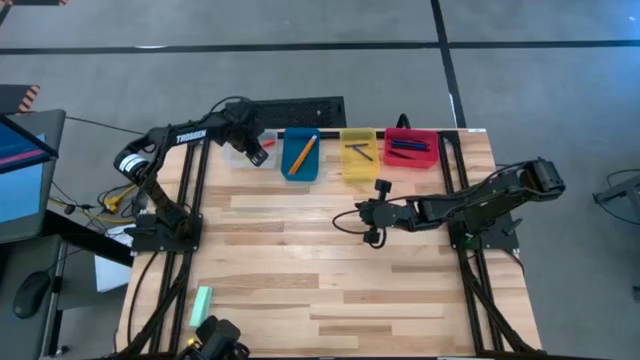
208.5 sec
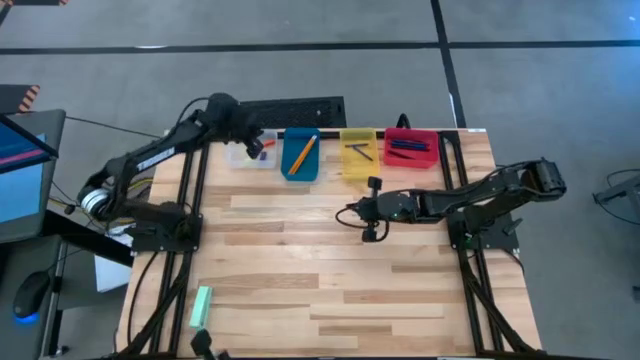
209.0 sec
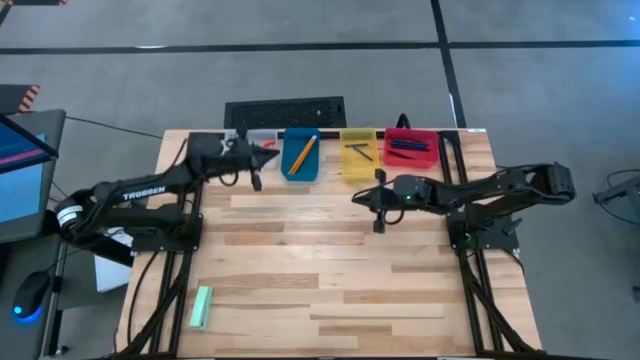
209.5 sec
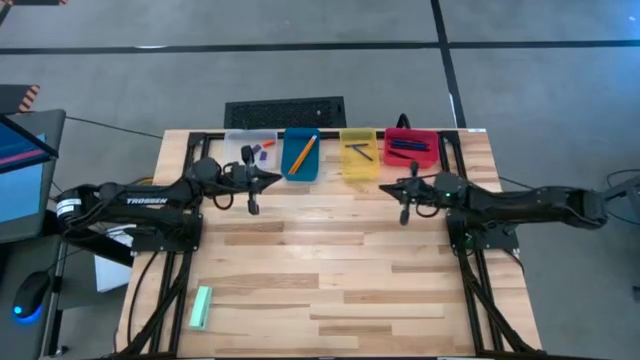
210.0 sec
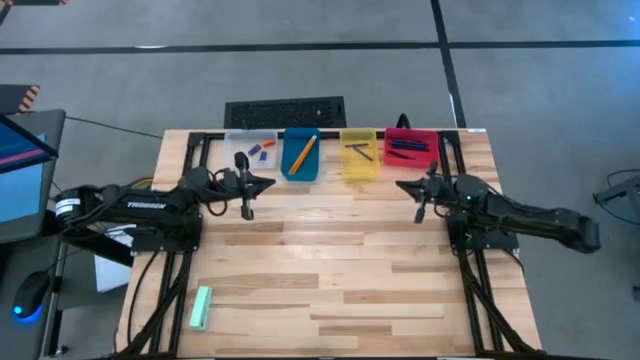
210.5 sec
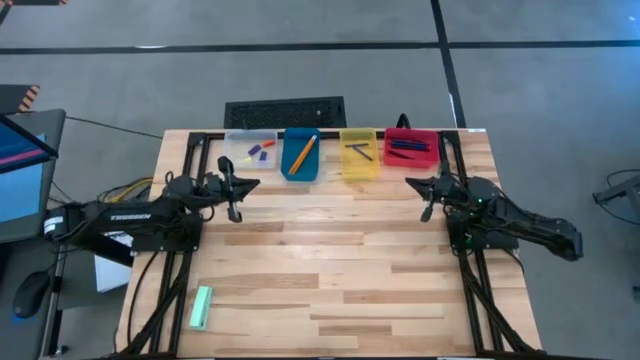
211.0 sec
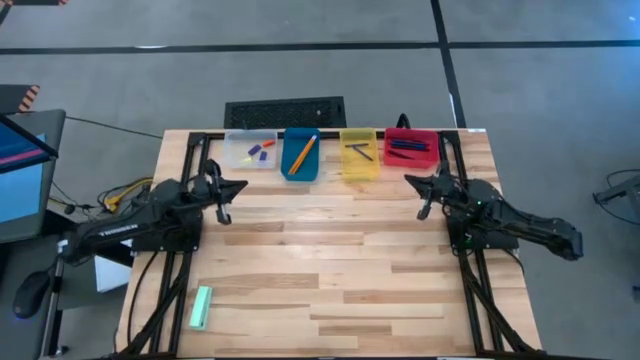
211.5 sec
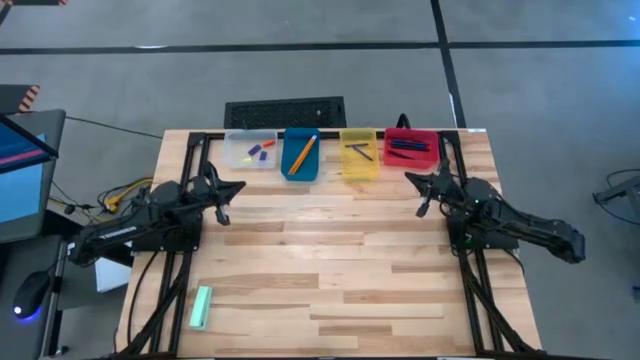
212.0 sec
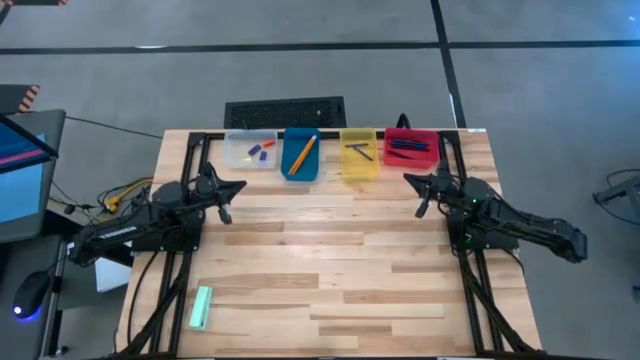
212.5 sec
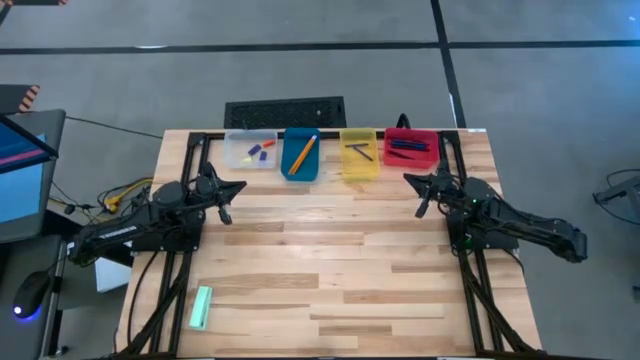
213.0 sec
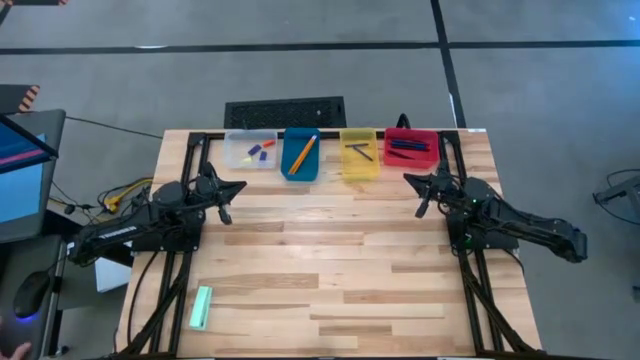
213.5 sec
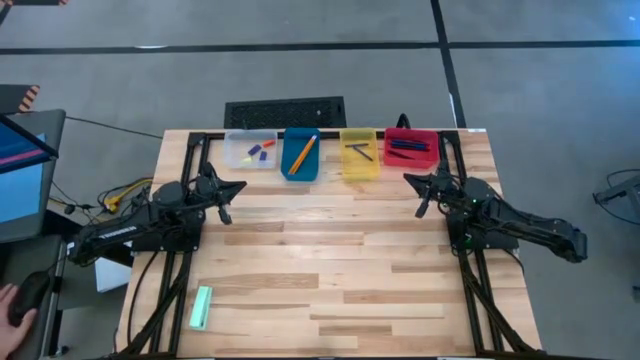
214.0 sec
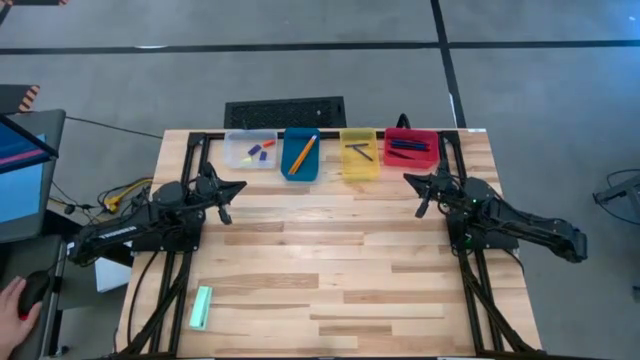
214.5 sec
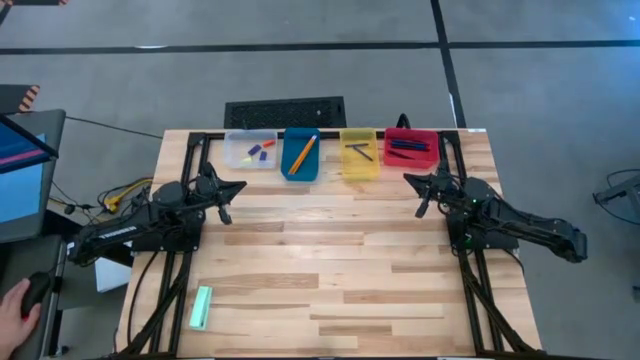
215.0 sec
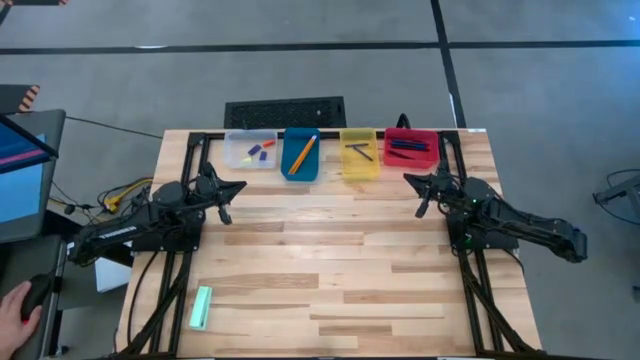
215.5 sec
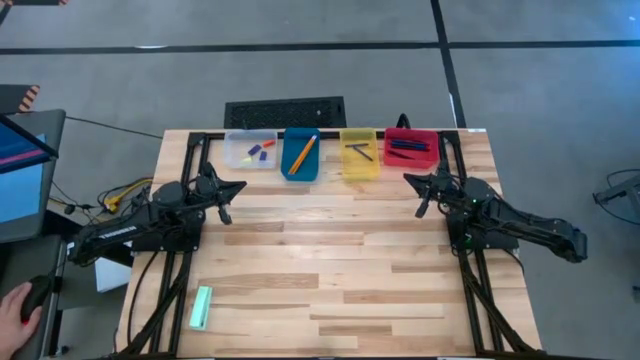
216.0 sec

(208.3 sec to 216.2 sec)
Task: Sort crayons/erasers/pens/pencils in bins
Return to Home Position

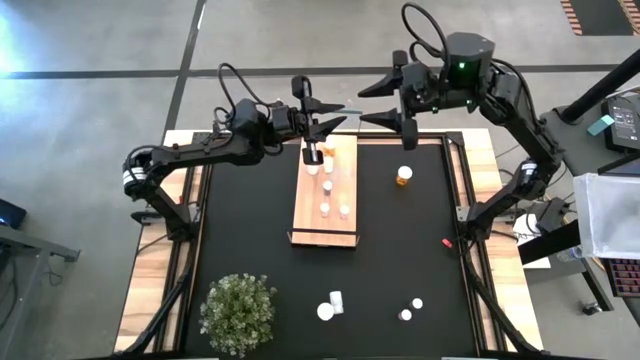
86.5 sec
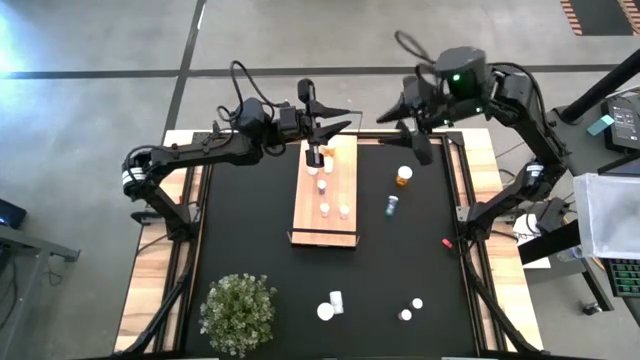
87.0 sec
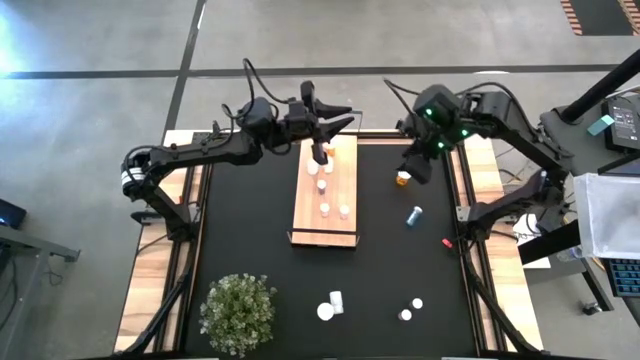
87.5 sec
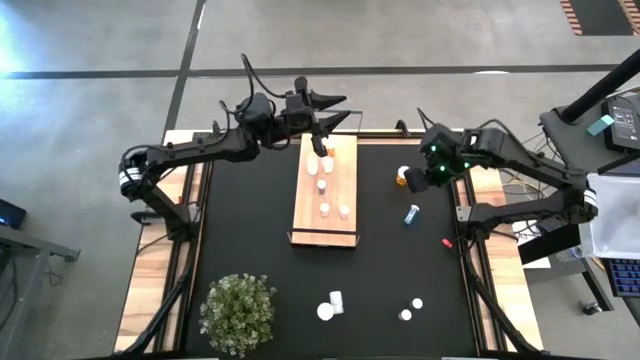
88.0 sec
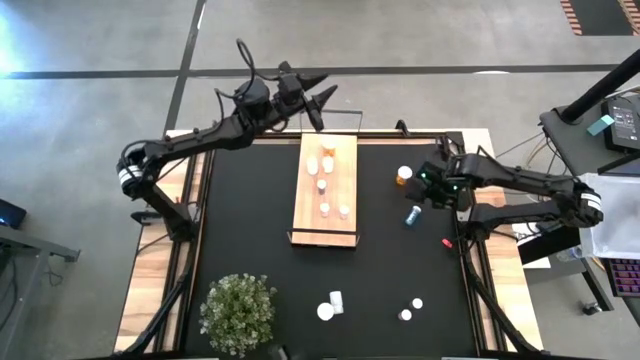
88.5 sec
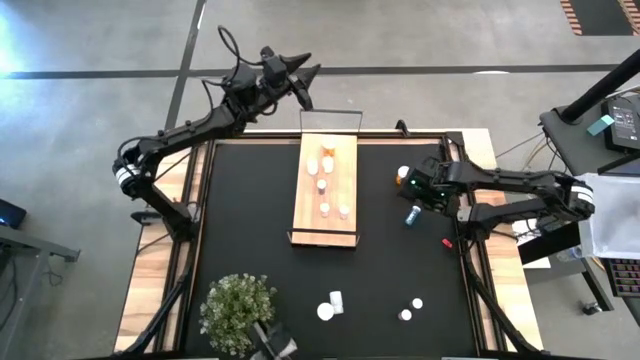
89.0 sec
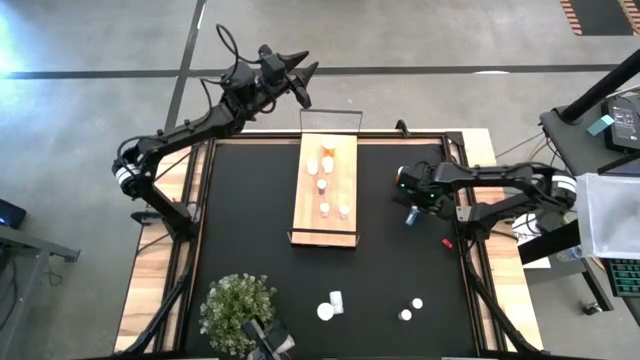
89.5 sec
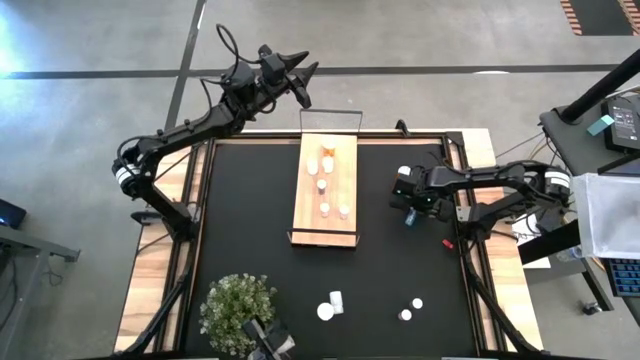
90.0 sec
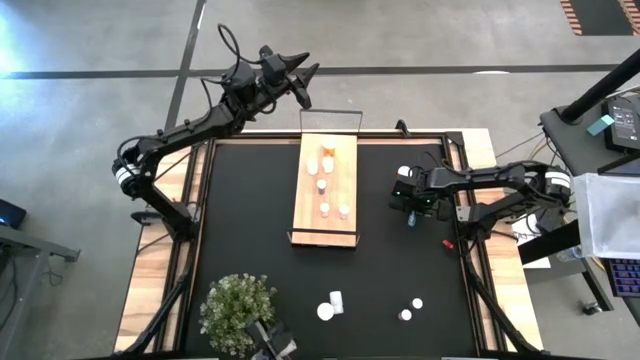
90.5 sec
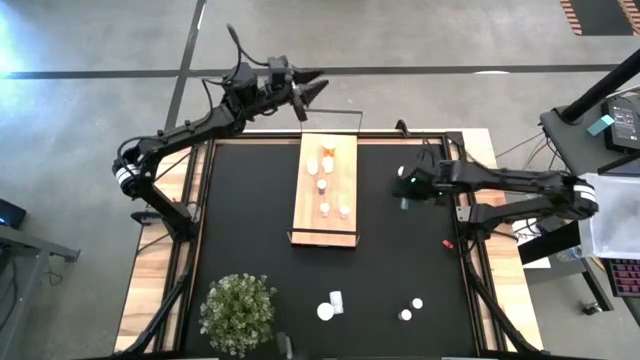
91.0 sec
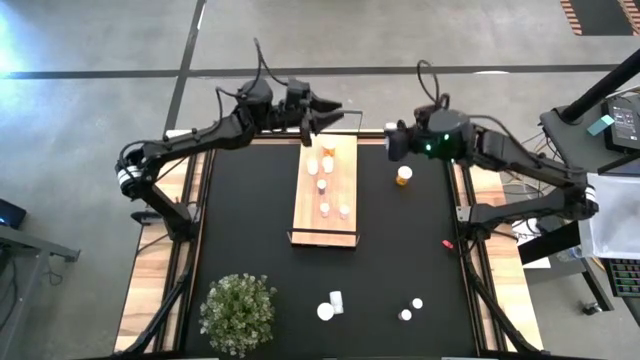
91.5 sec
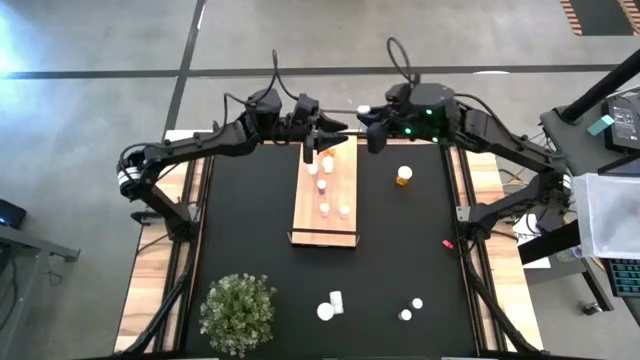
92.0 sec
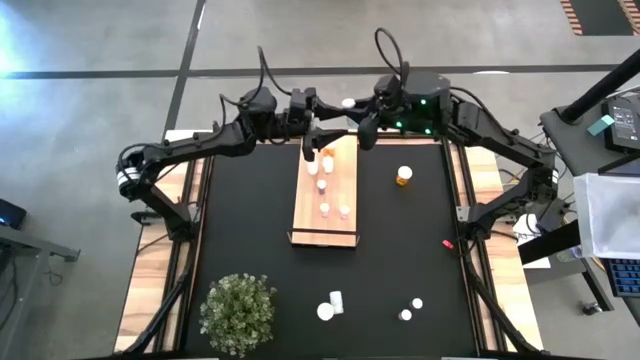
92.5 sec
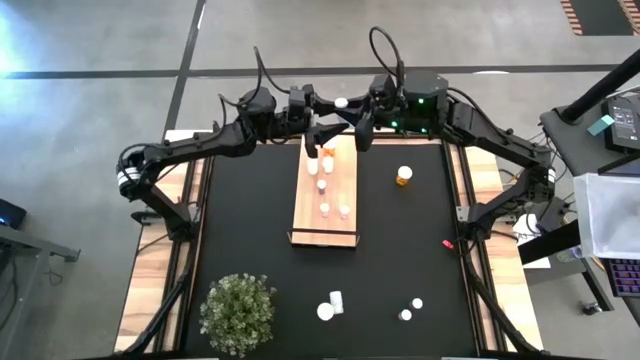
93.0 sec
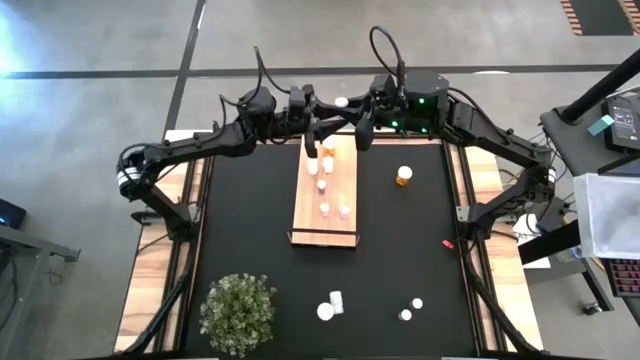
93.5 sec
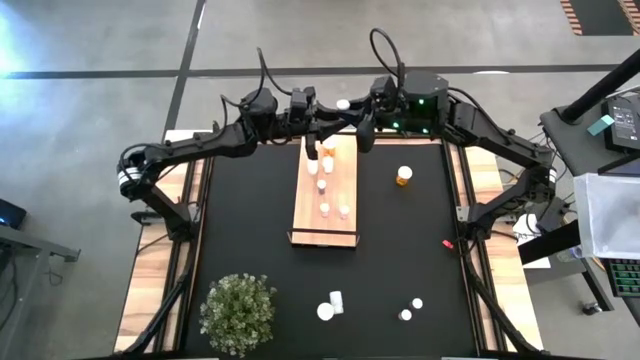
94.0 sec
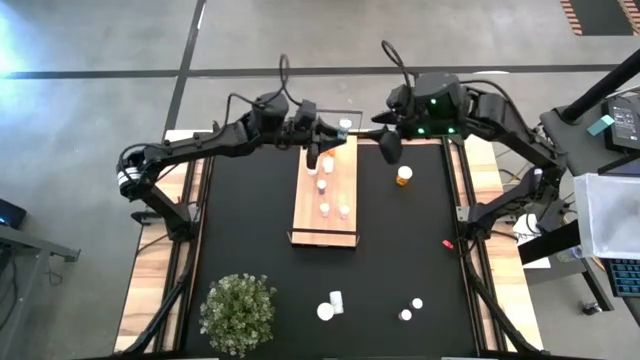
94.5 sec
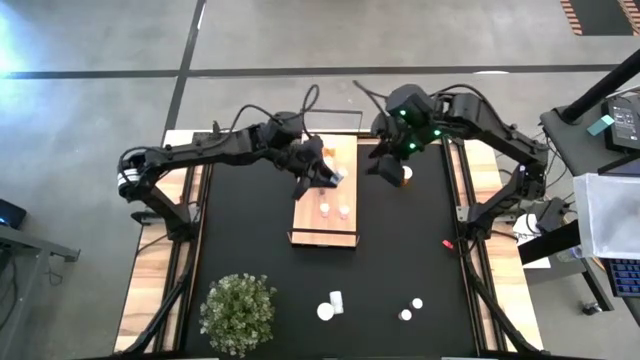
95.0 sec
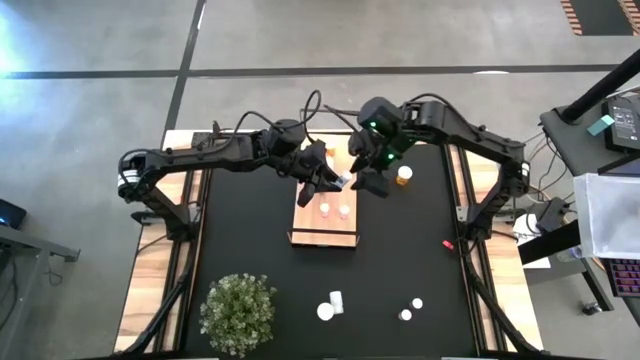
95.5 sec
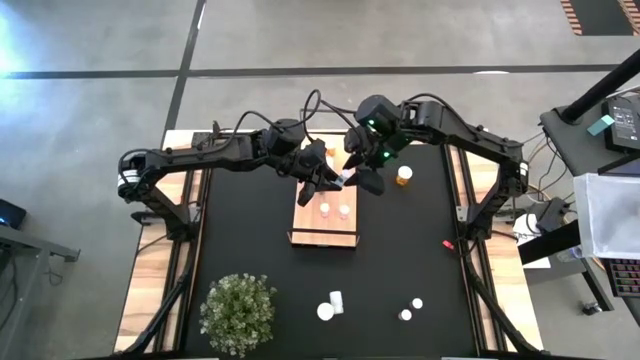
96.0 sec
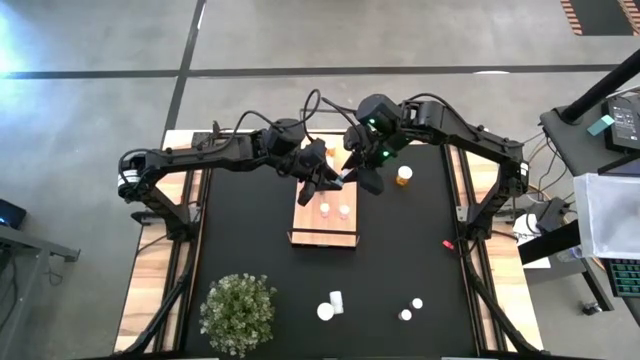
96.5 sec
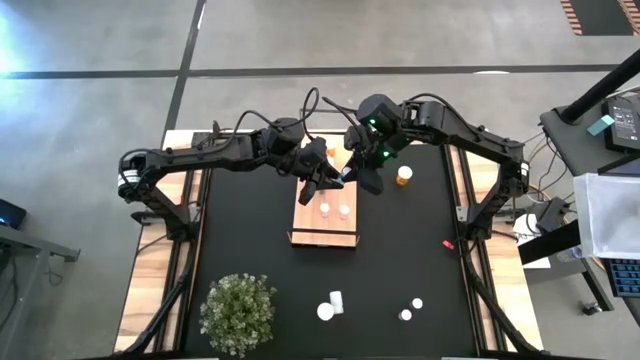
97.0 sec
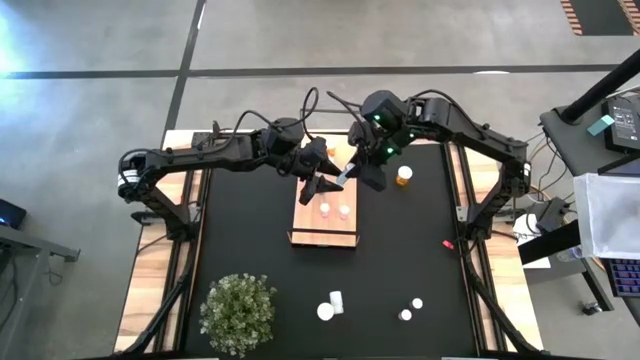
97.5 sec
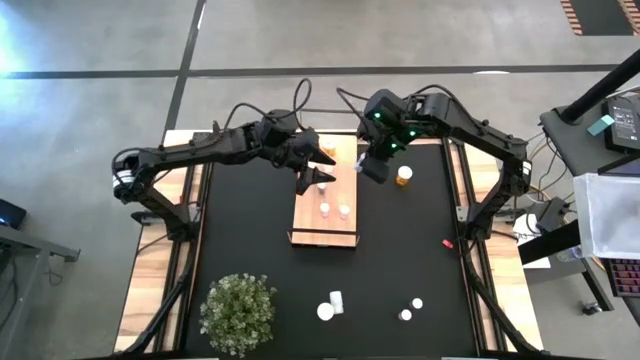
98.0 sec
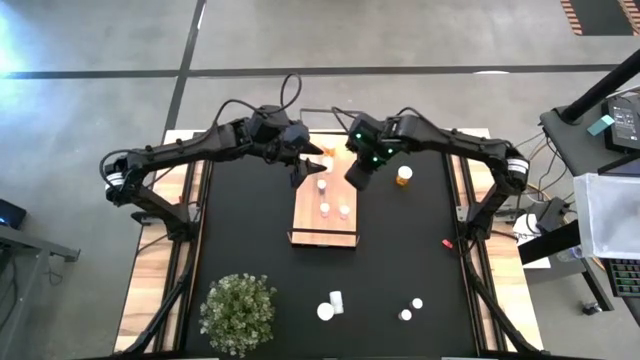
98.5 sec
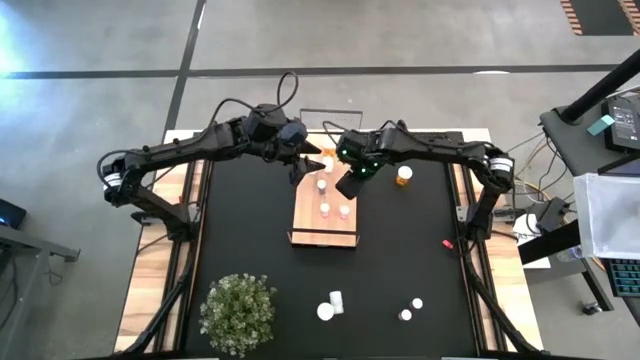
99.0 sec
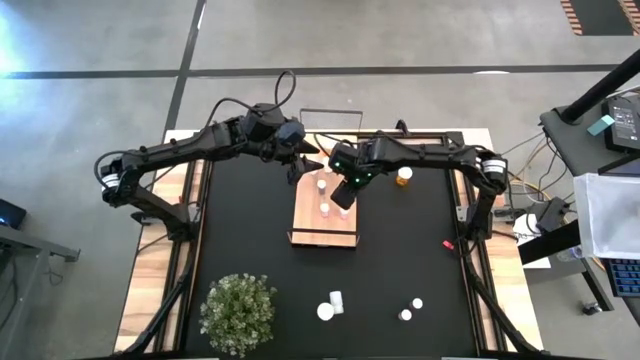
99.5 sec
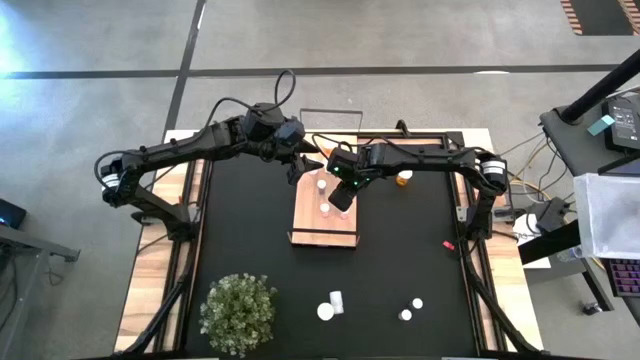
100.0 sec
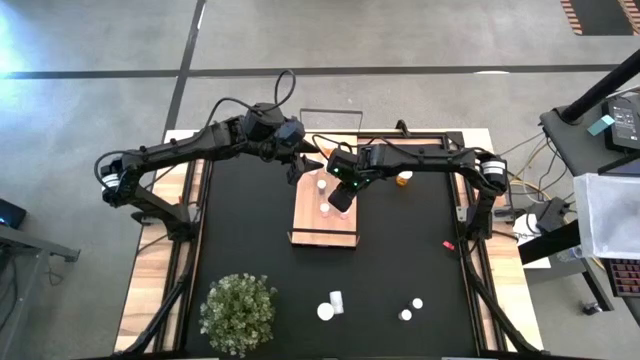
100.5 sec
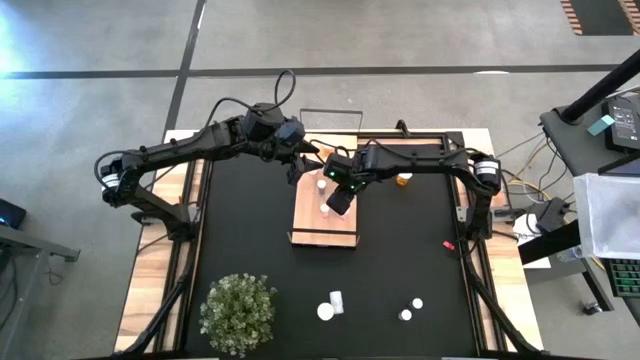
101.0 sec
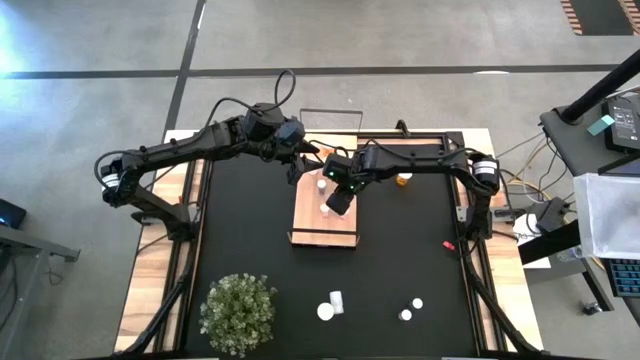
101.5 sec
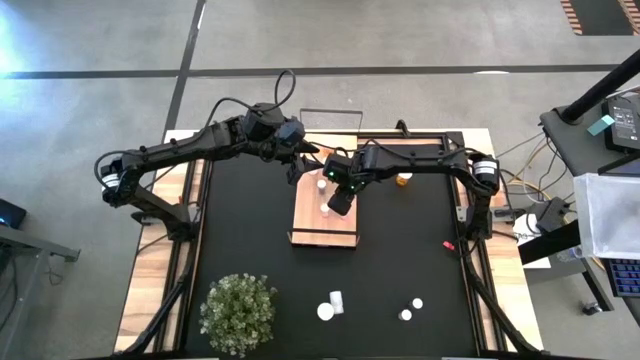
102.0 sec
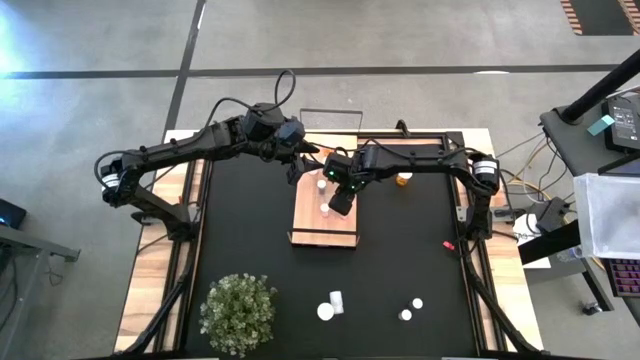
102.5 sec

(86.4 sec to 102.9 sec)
Task: Pick and place medicine bottles onto shelf by color
Put the top blue pill bottle on the shelf aligned with the other blue pill bottle
